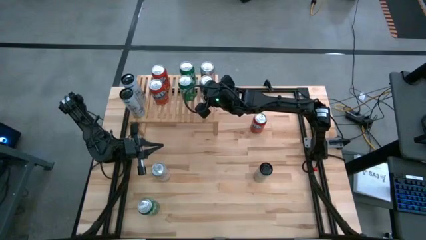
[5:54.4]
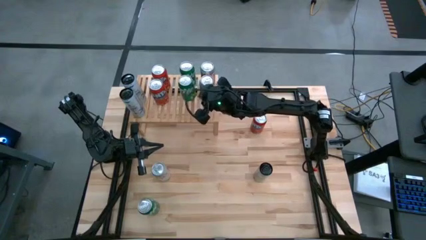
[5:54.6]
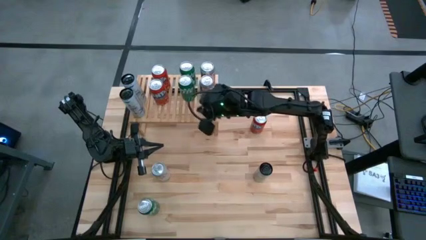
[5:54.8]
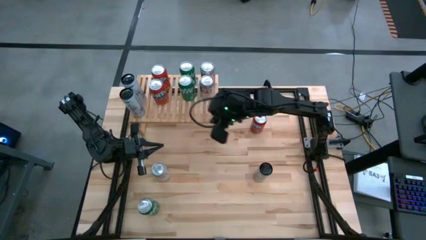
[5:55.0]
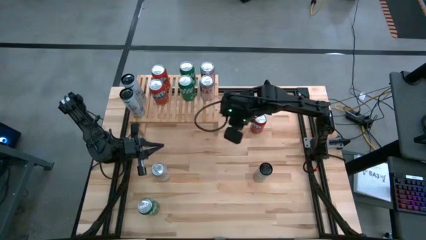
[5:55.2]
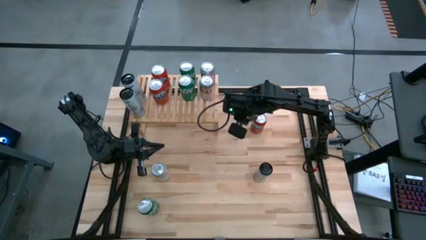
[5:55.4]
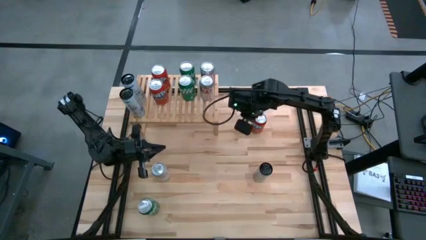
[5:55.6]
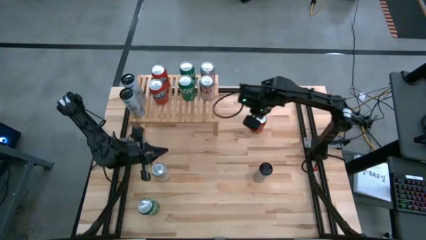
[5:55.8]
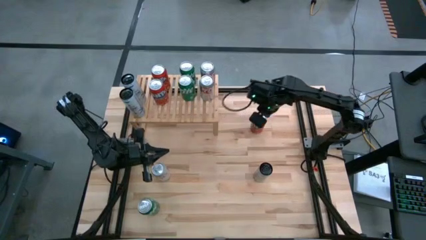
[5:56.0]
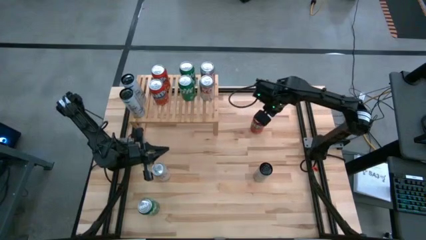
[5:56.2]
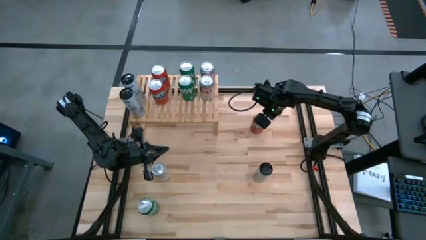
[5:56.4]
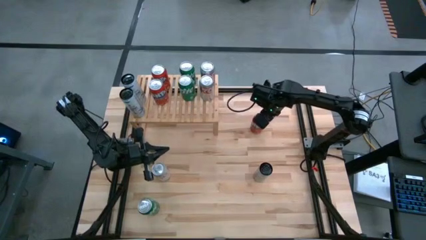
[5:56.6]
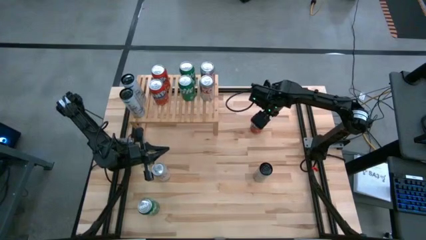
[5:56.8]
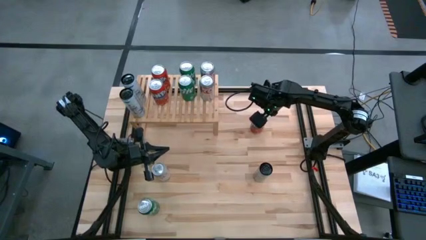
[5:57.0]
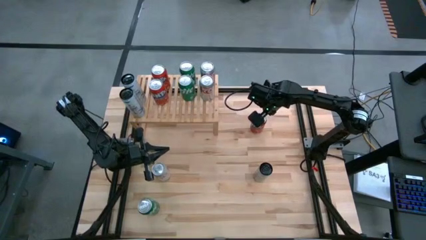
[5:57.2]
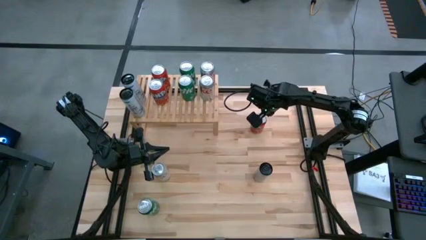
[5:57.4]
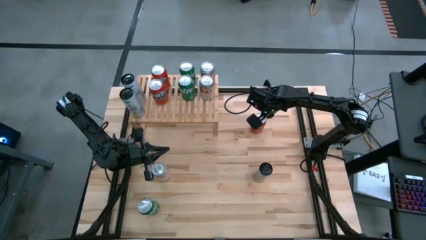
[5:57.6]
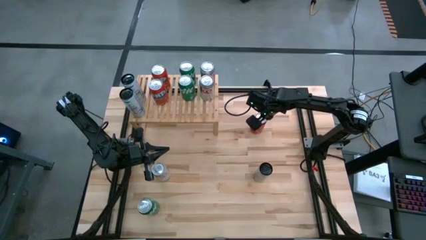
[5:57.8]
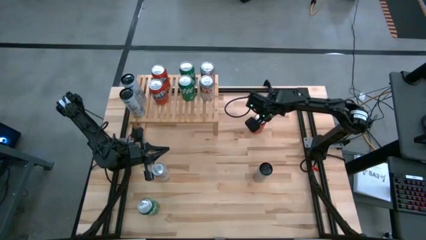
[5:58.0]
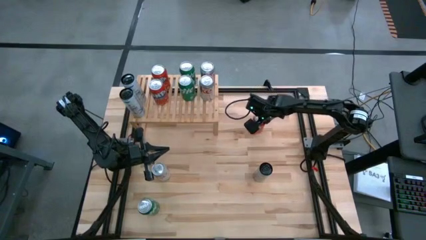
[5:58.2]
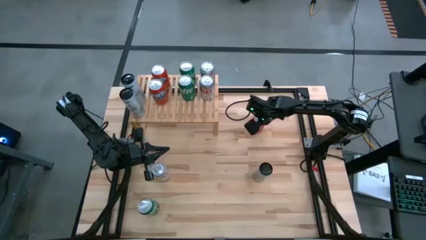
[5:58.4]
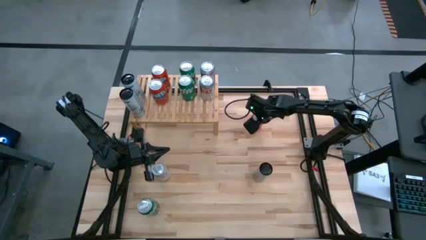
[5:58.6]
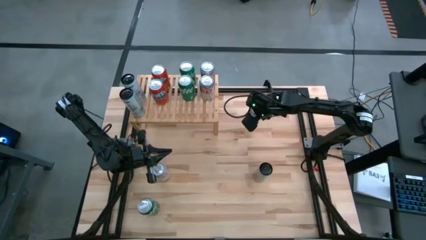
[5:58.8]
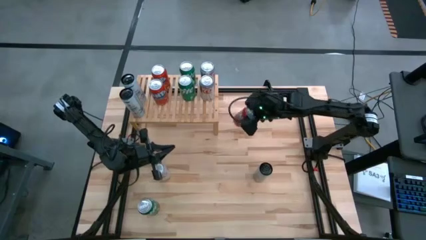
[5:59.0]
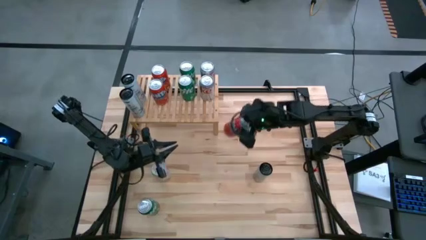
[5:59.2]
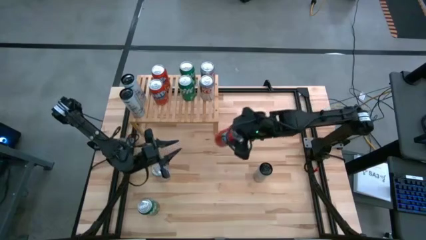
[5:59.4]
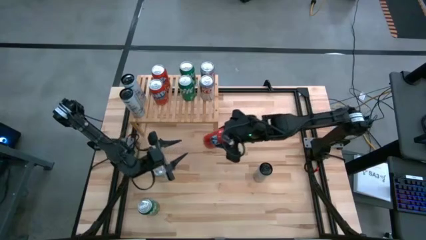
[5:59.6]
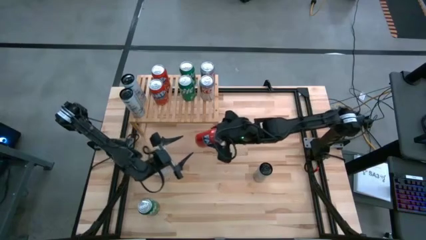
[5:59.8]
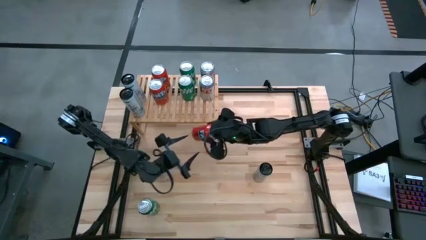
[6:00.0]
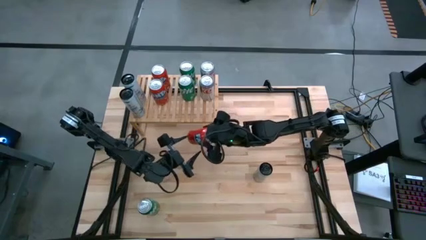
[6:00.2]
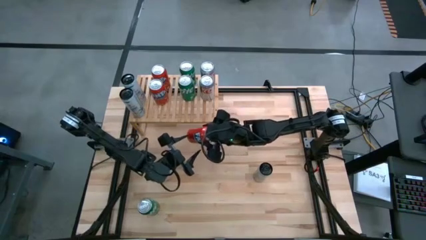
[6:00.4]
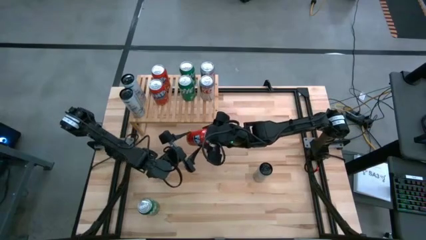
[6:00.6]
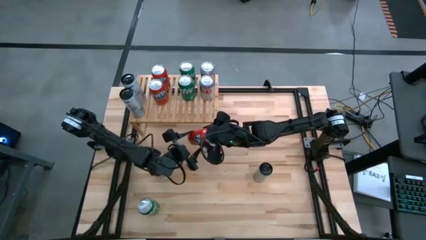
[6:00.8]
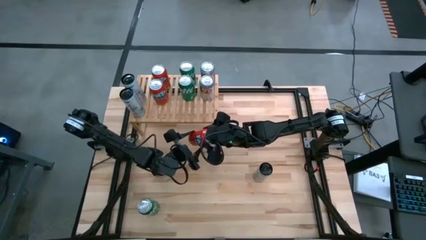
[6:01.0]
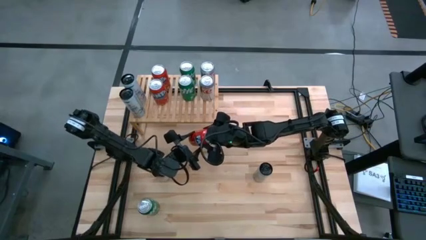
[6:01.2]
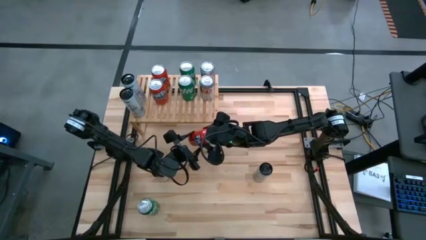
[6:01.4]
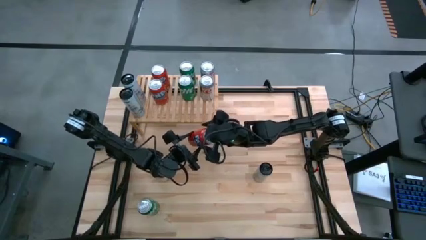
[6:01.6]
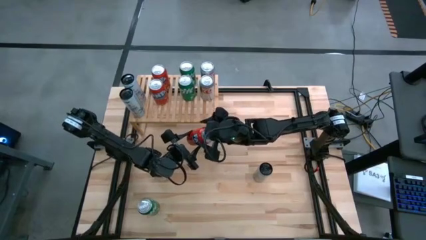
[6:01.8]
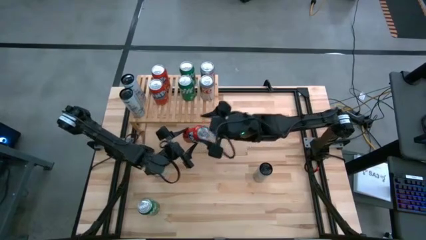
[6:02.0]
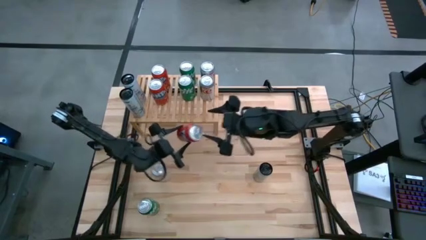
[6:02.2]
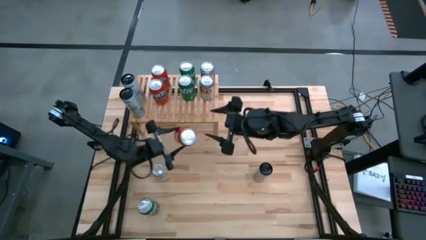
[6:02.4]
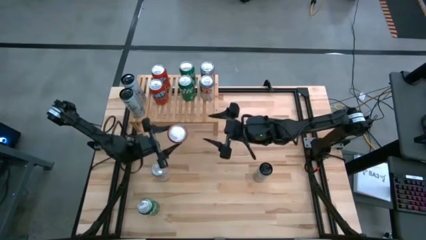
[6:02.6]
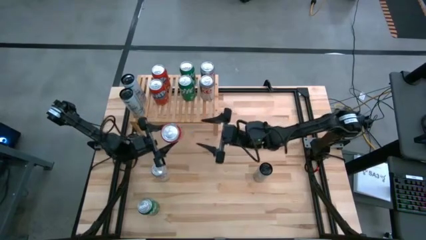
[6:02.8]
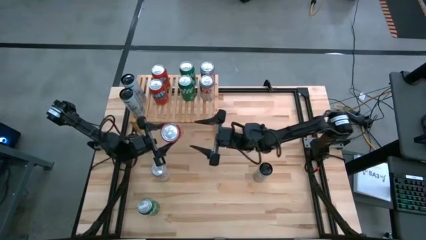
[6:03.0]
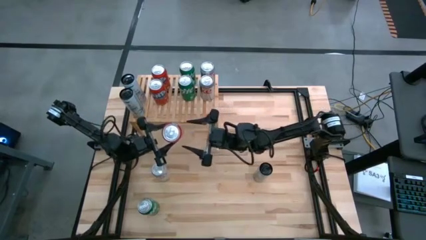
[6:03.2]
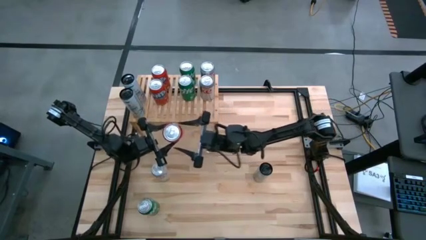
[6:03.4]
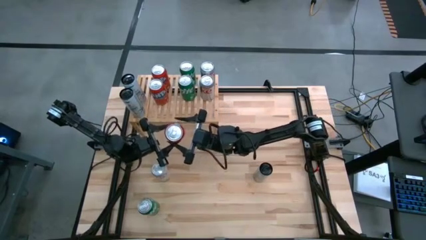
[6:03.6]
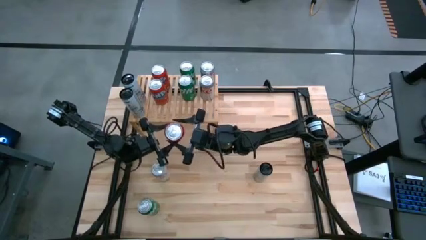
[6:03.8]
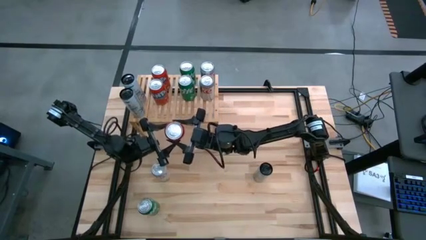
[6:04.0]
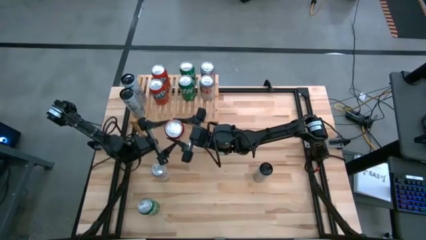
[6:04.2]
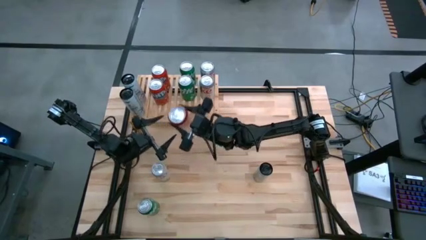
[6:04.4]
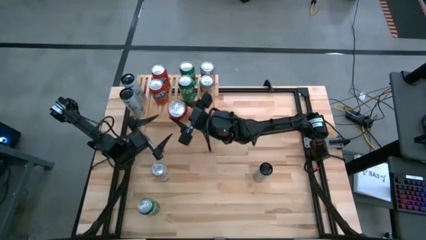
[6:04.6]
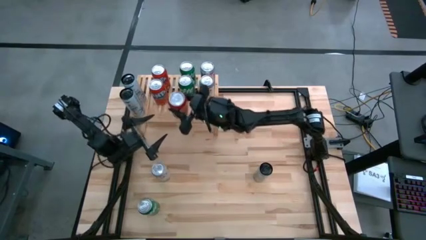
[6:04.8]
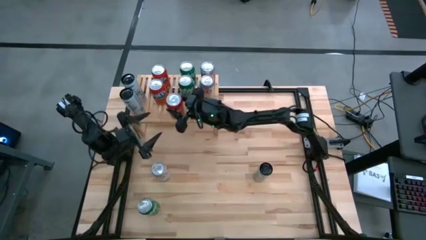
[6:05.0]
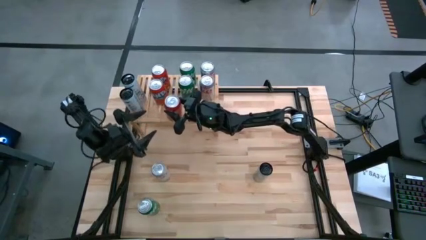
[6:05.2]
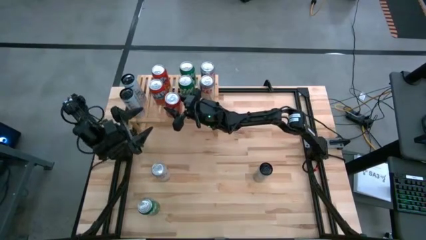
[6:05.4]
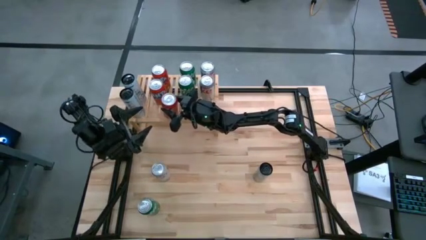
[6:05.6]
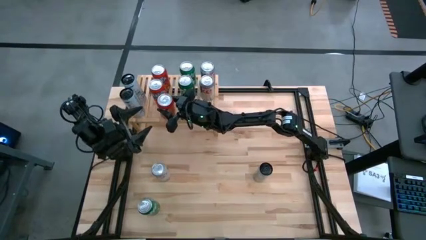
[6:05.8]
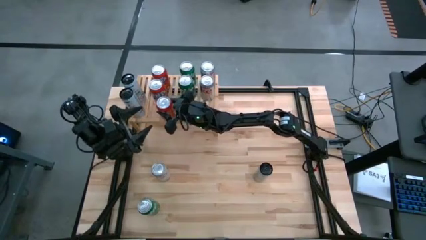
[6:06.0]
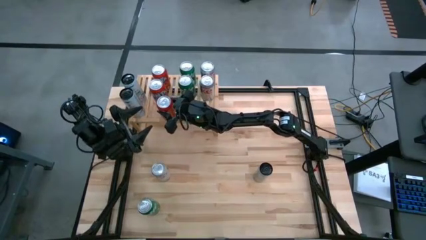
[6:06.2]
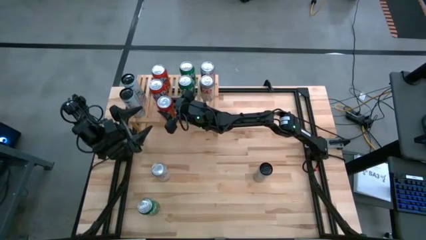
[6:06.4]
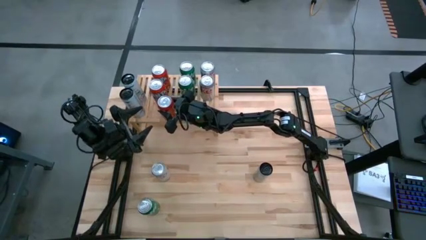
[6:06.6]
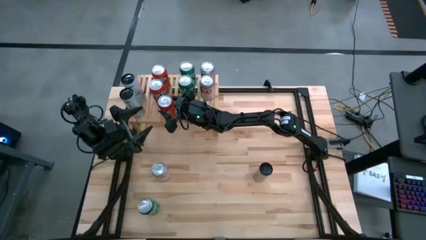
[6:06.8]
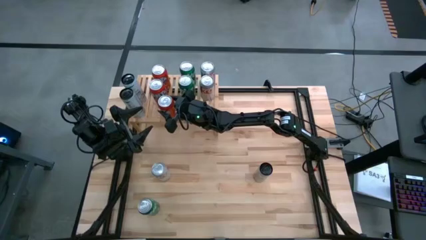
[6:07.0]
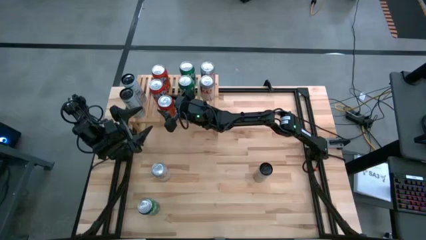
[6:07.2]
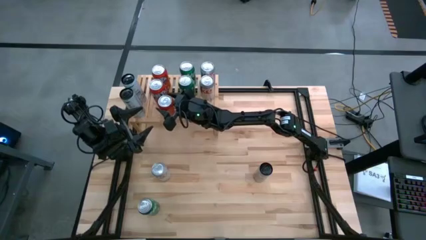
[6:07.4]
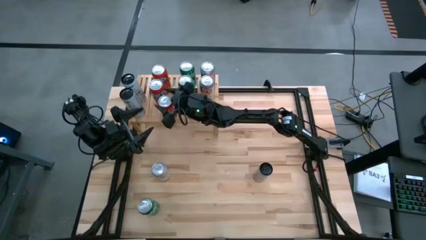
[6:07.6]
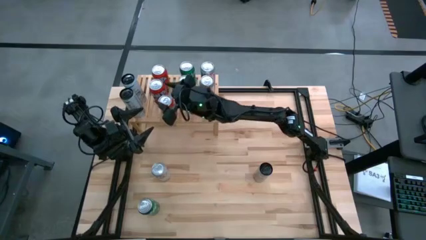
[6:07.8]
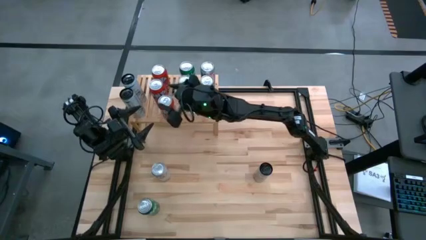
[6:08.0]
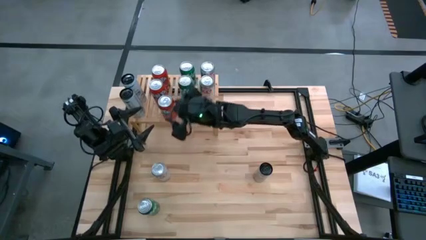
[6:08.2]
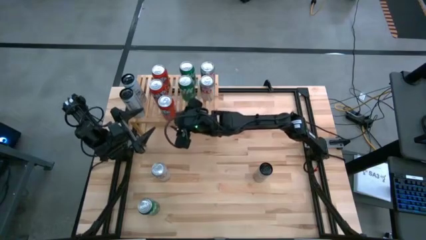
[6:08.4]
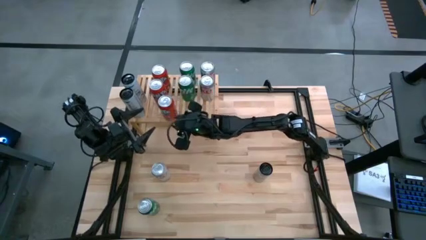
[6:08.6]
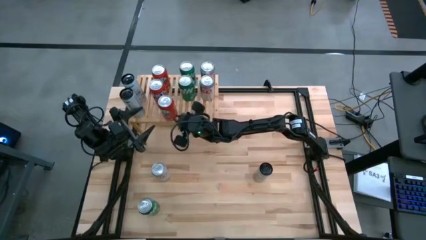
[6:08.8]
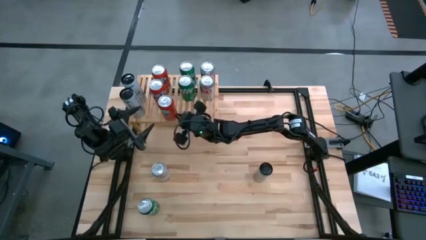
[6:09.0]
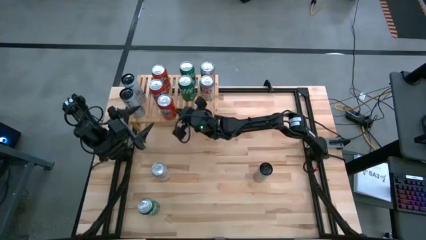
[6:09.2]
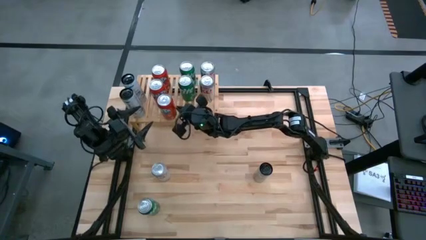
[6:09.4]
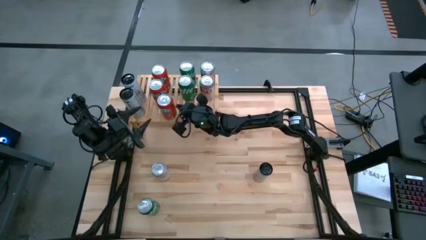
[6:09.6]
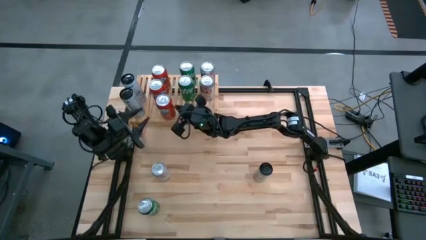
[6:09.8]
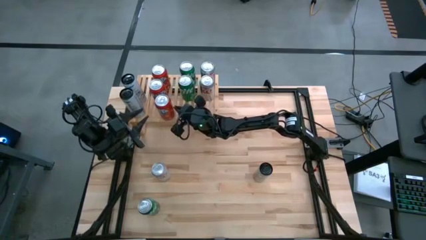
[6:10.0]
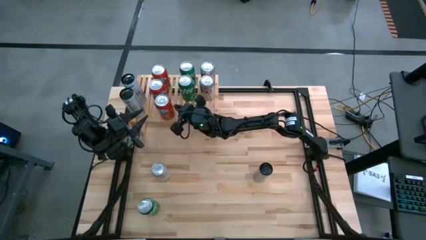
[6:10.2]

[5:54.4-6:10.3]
Task: Place canned beverage on shelf
Put the orange soda can on the shelf aligned with the other orange soda can
